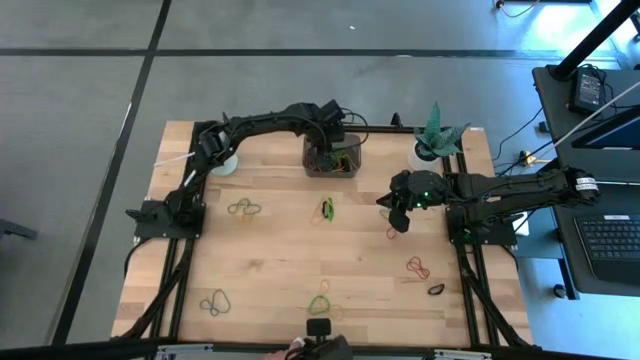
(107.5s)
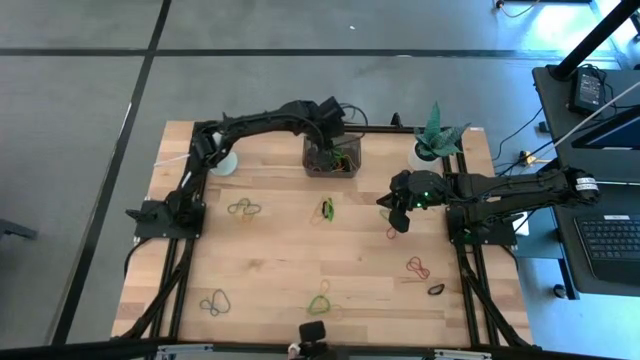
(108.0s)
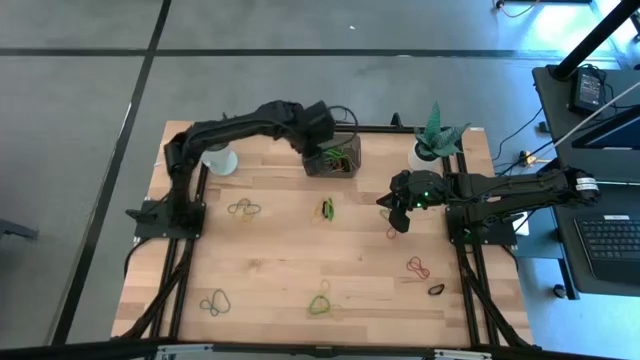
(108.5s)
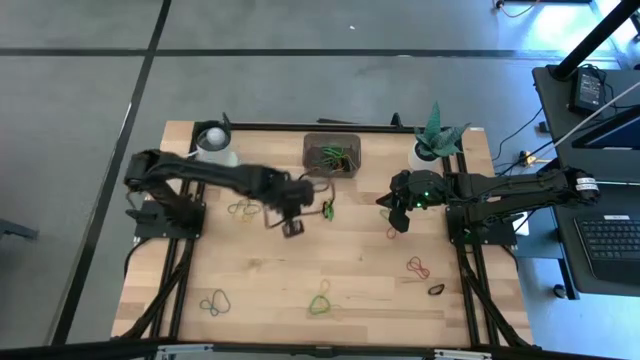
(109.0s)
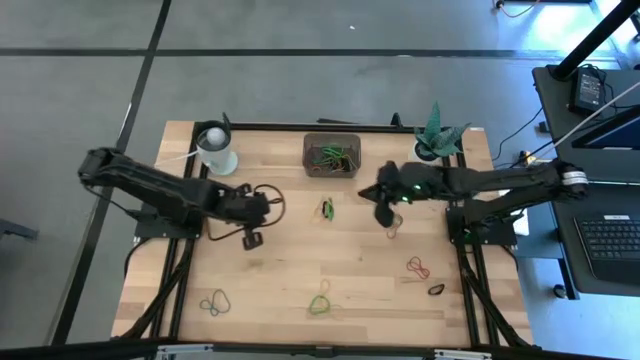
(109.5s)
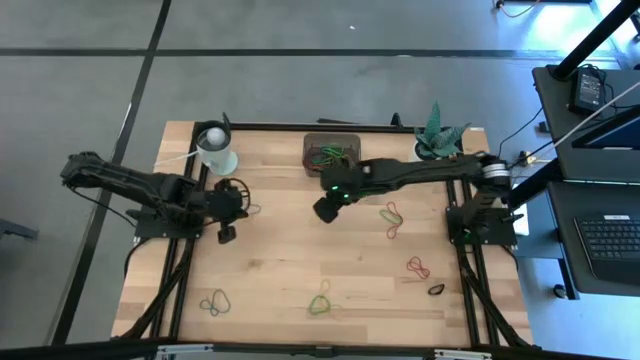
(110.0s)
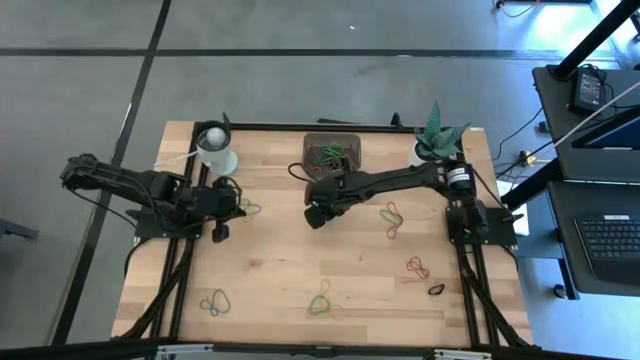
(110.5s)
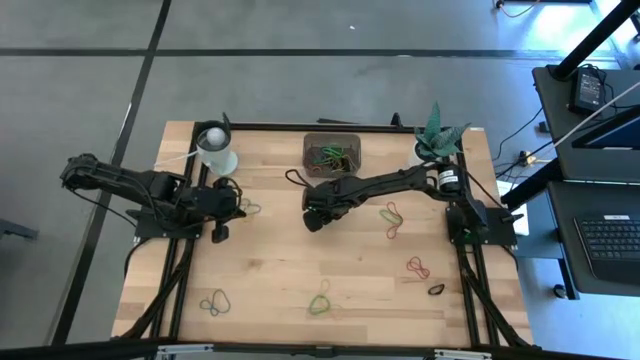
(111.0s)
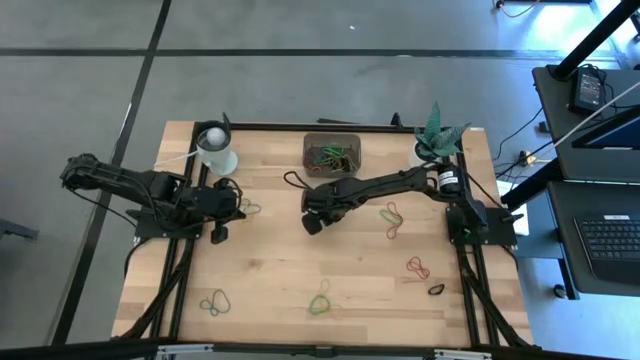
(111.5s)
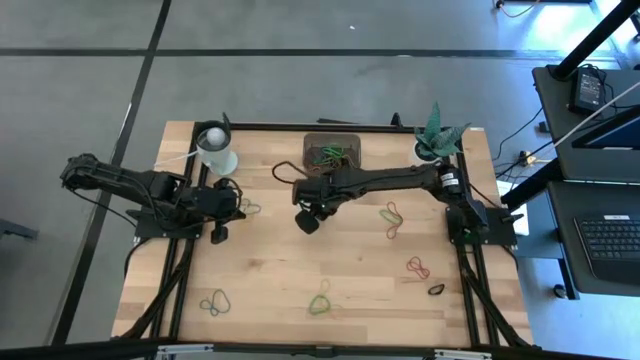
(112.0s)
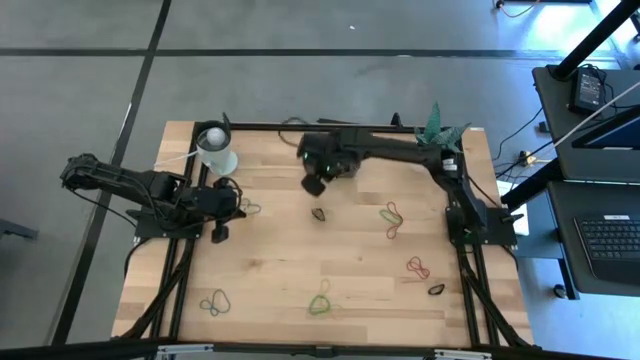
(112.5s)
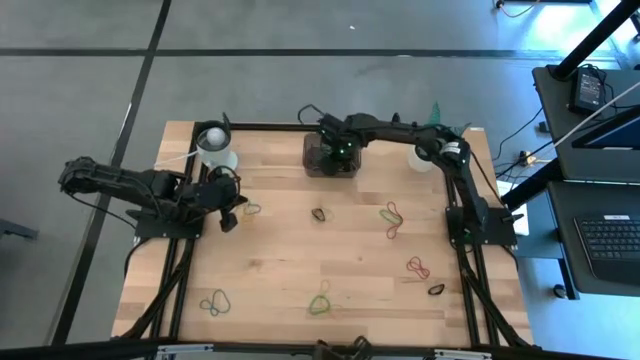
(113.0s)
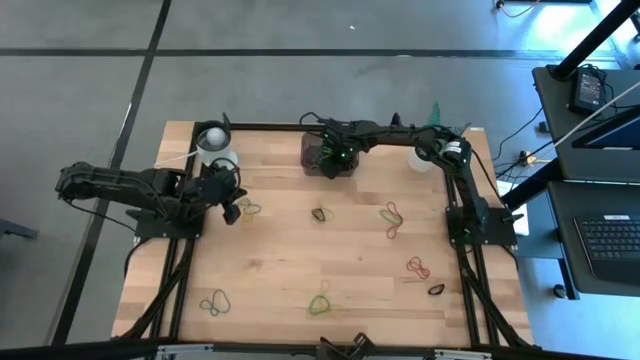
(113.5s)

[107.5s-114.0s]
Task: Pick and place rubber bands into bin
Put the green rubber band into the bin

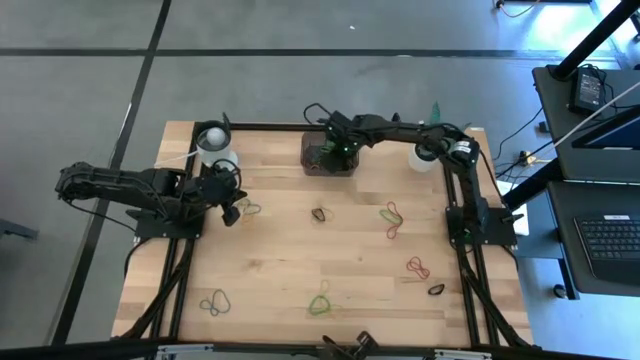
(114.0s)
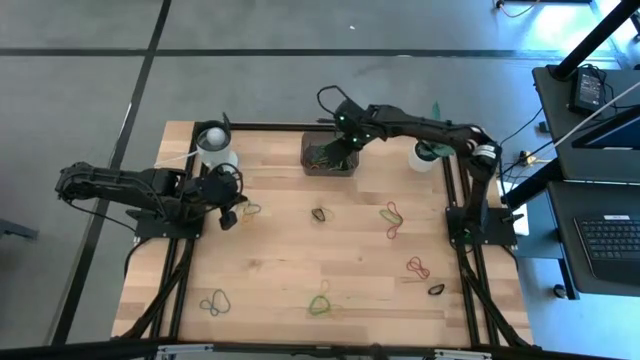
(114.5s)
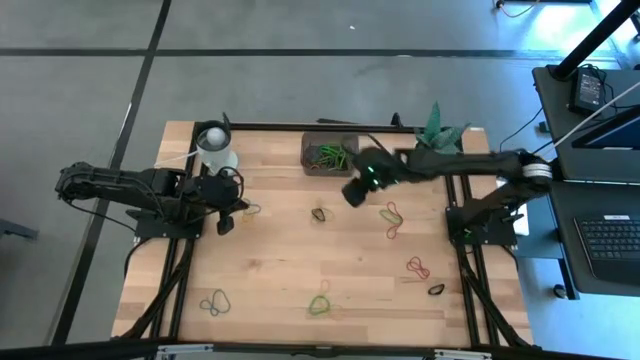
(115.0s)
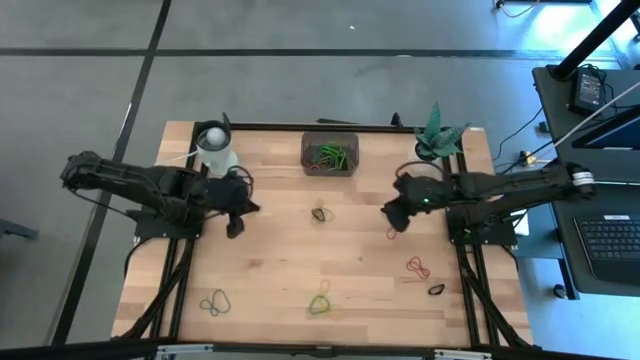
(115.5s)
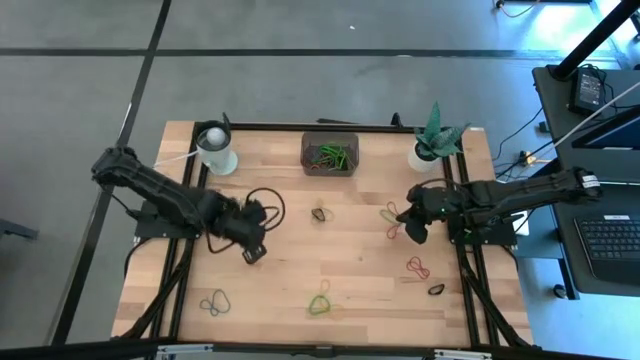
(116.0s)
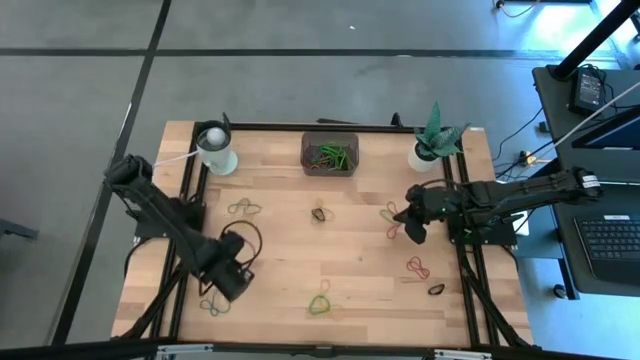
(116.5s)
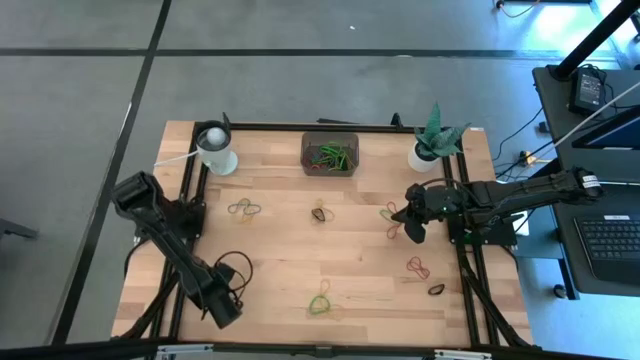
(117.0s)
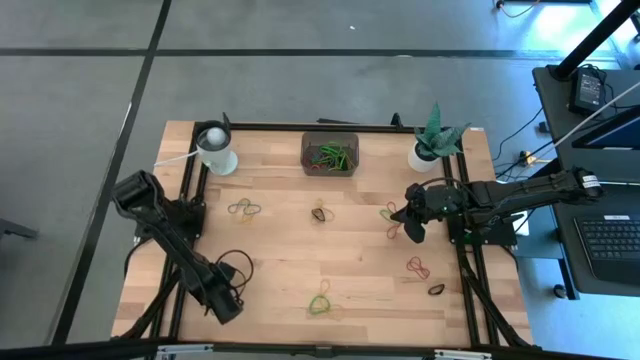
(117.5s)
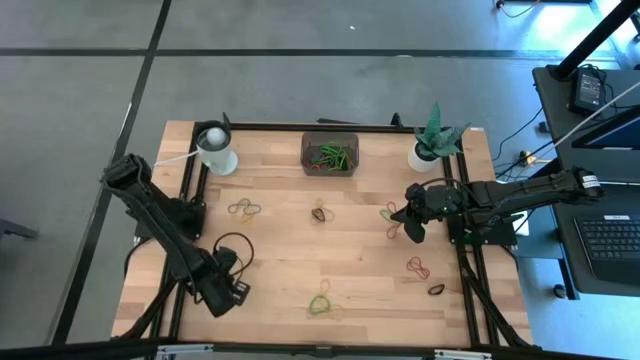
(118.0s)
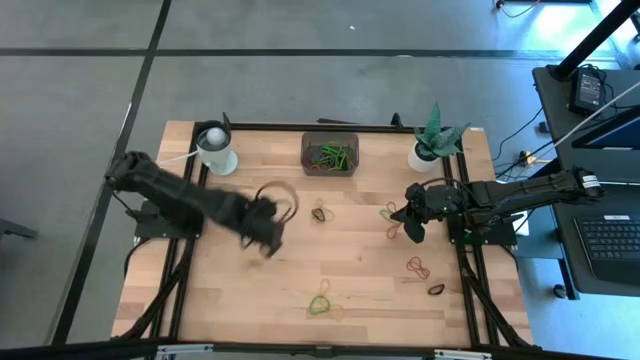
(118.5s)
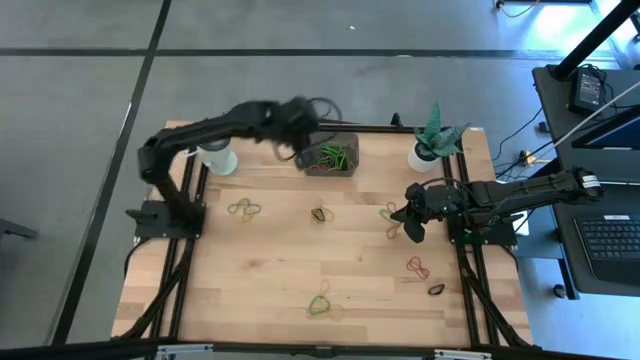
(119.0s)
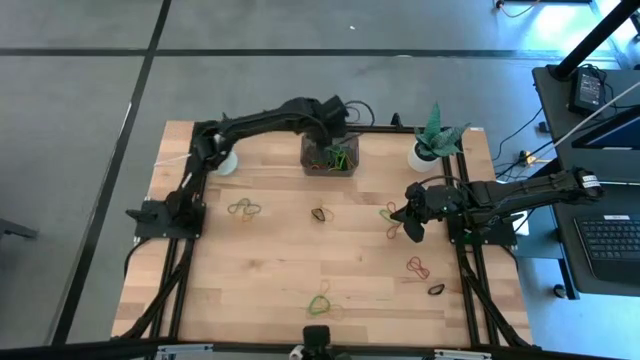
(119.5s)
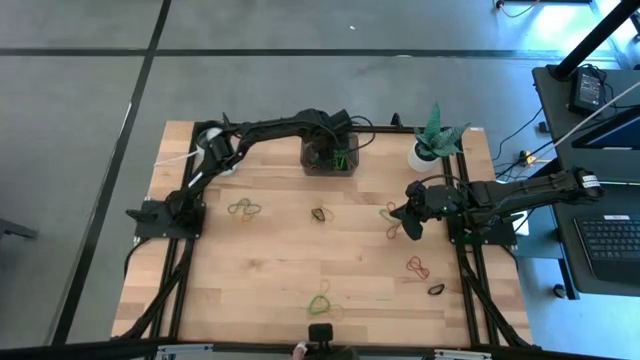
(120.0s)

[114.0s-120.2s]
Put the blue rubber band into the bin

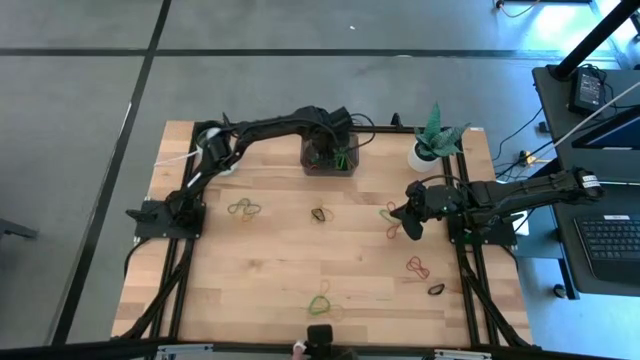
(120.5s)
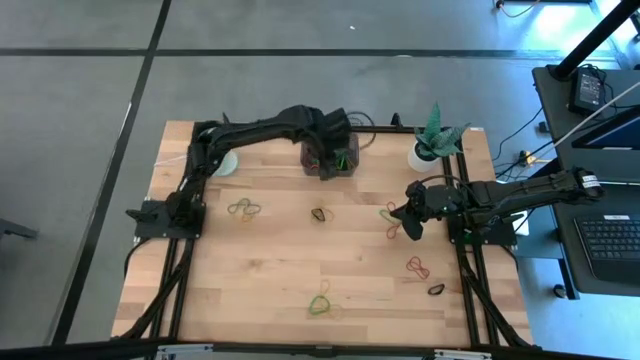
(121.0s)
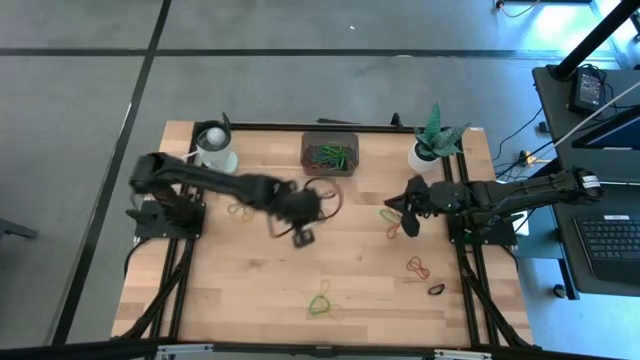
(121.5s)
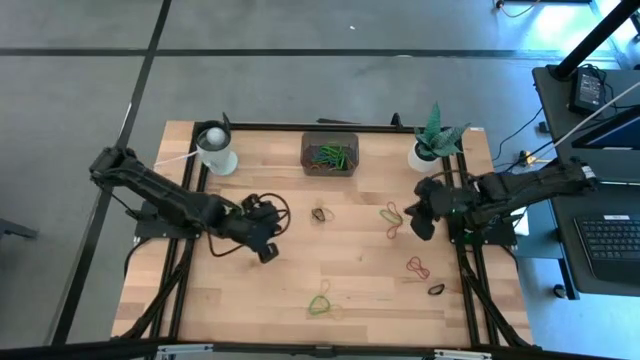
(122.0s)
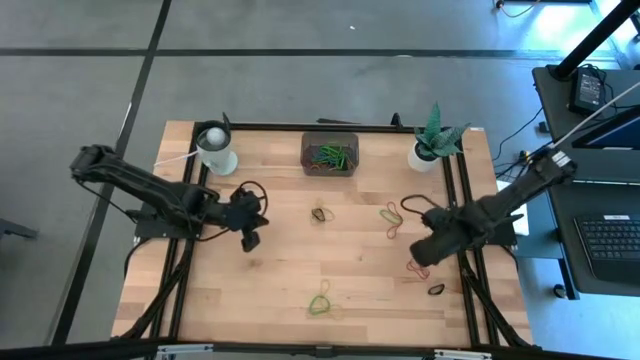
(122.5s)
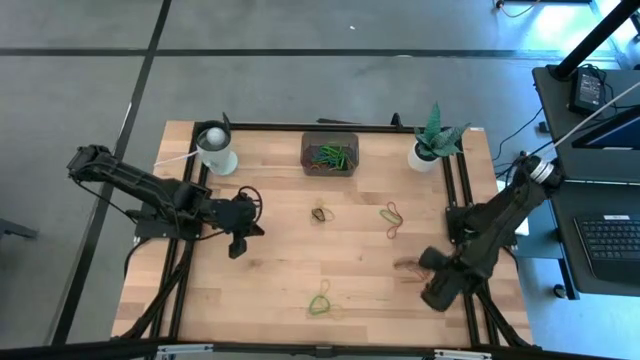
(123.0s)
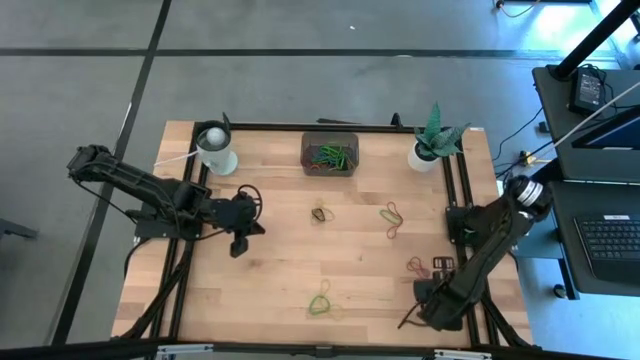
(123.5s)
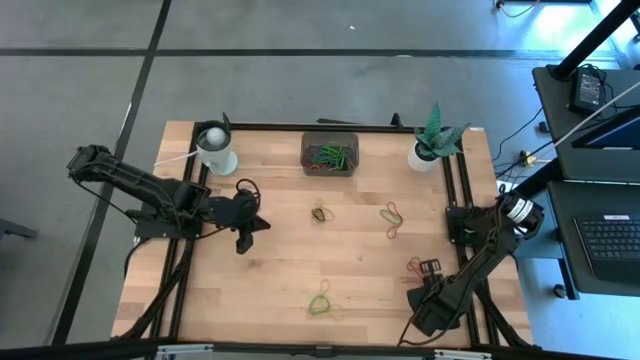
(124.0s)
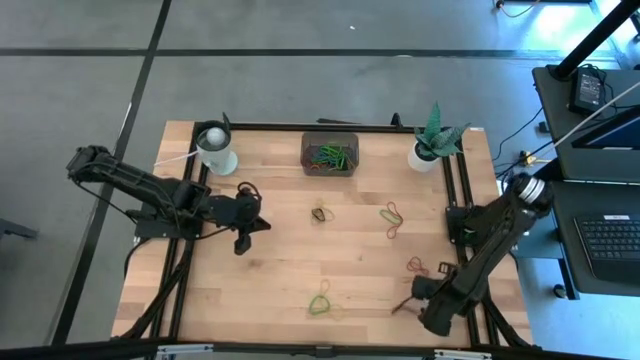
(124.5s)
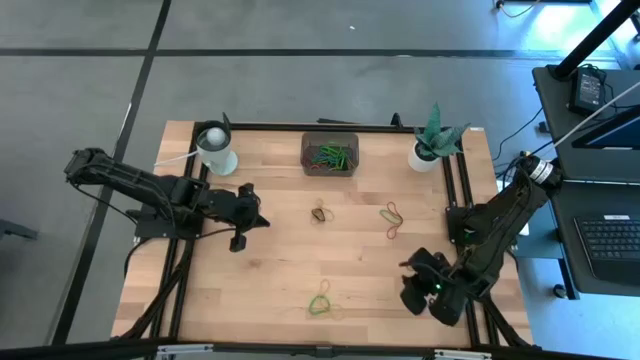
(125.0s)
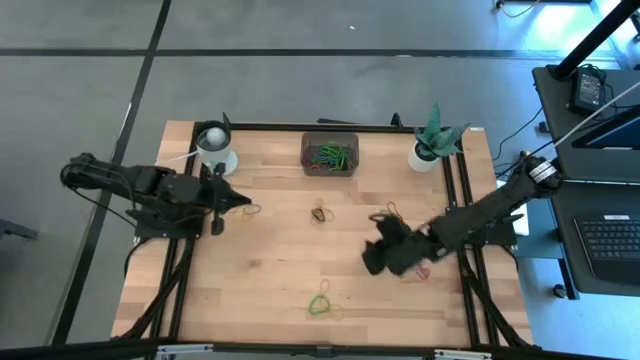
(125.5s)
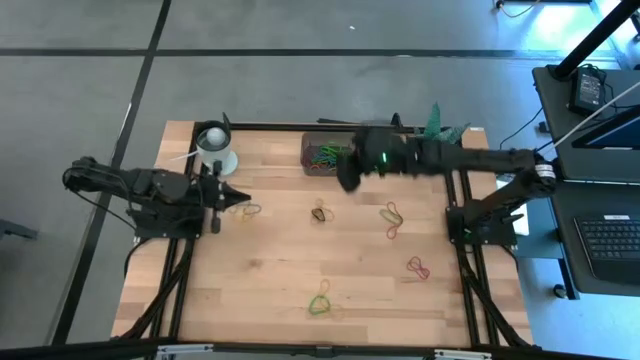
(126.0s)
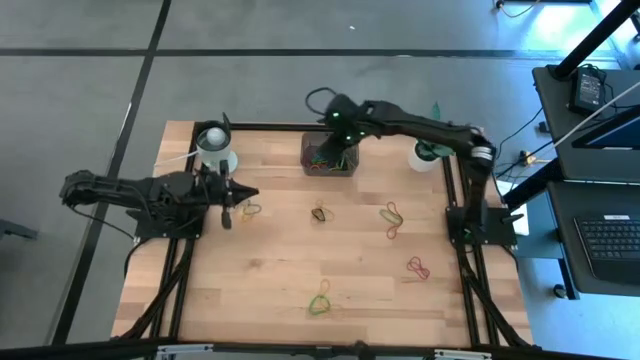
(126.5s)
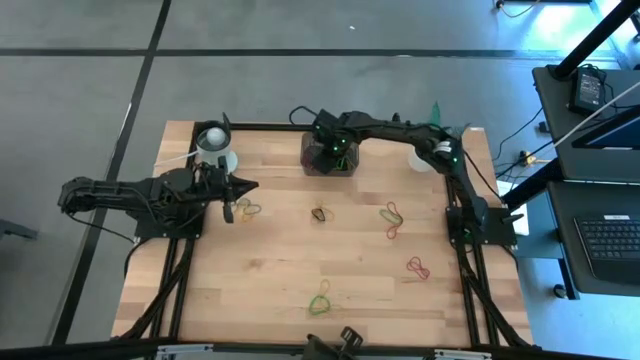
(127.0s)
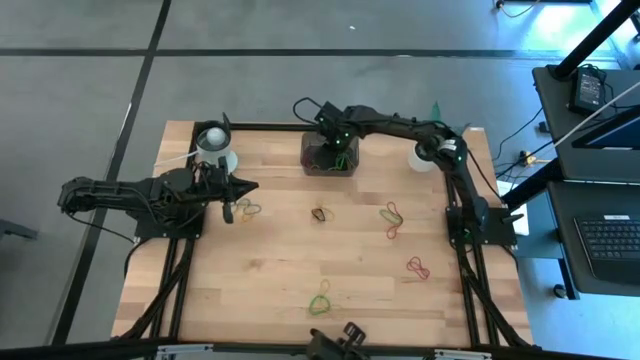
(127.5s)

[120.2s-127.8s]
Put the black rubber band into the bin

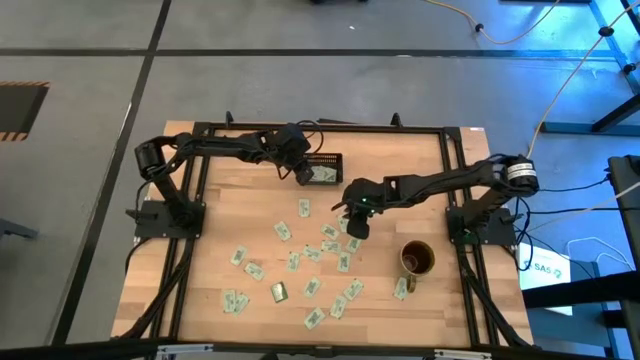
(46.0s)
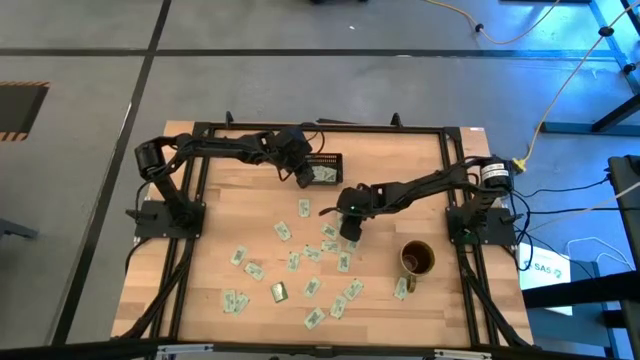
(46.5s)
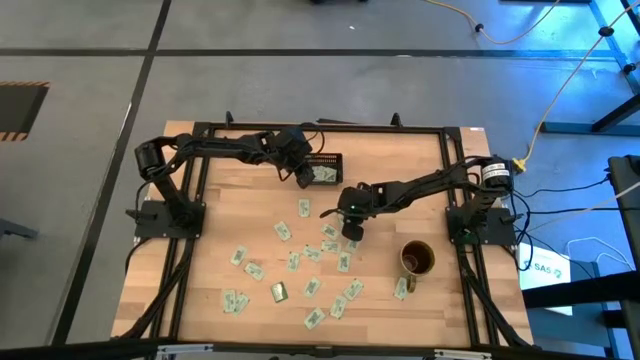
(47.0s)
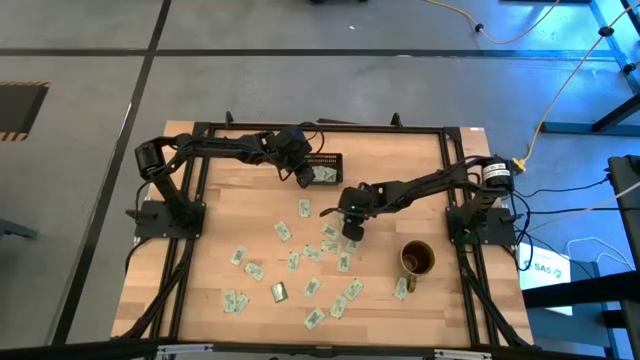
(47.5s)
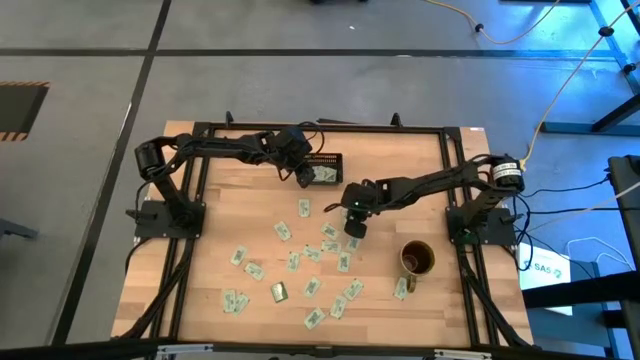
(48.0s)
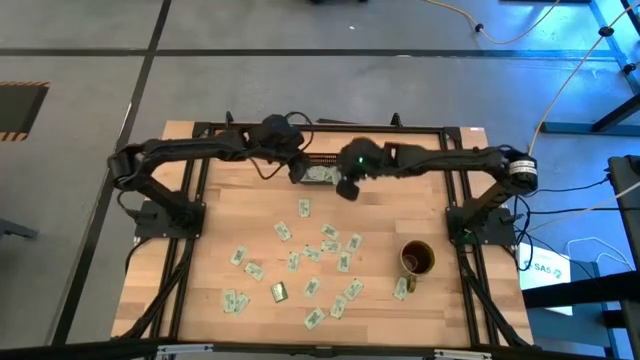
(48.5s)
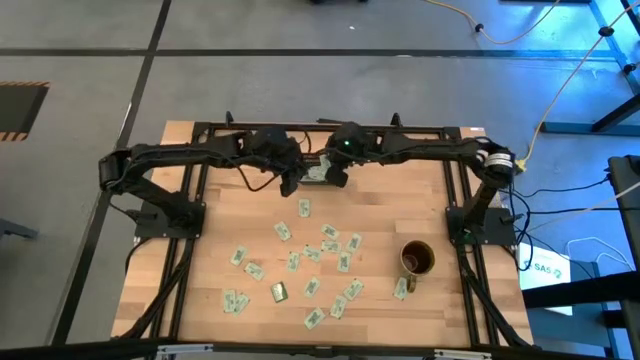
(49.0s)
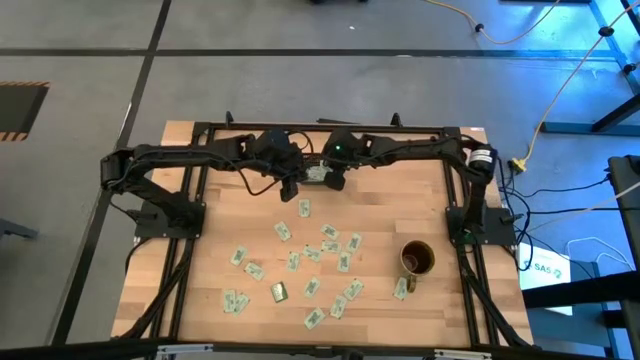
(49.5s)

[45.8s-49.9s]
Task: Pick and place Stevia / Truvia into bins
Put the white stevia packet into the black bin
